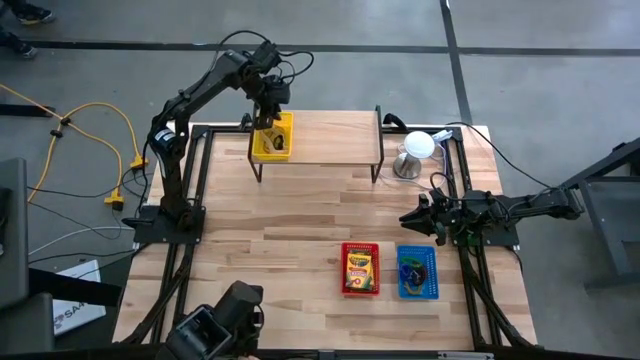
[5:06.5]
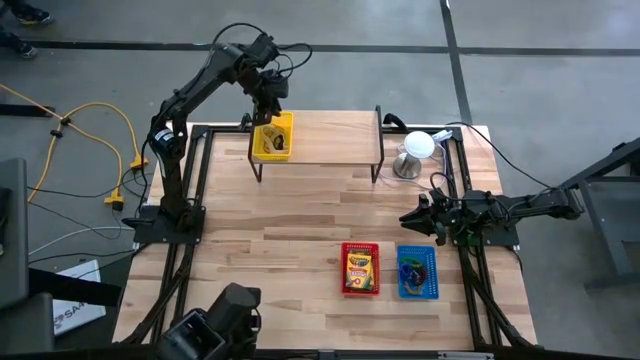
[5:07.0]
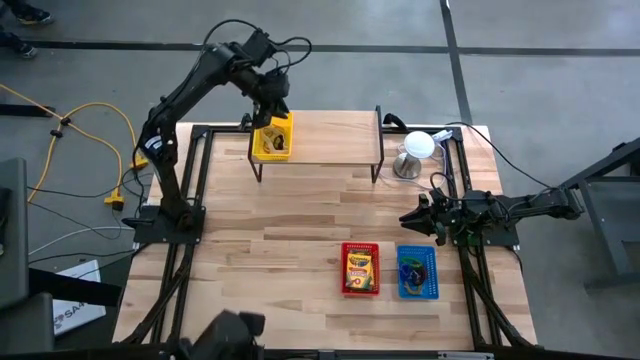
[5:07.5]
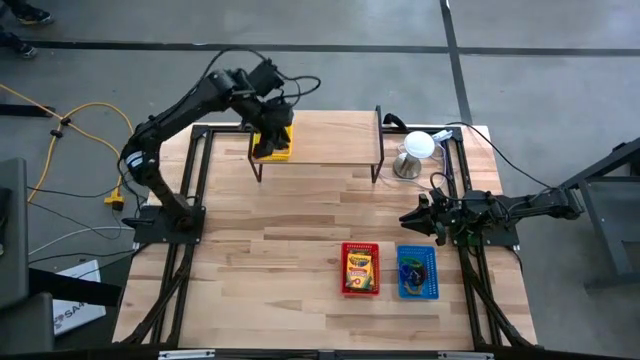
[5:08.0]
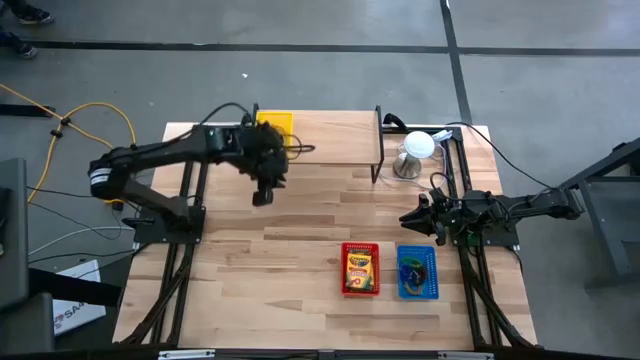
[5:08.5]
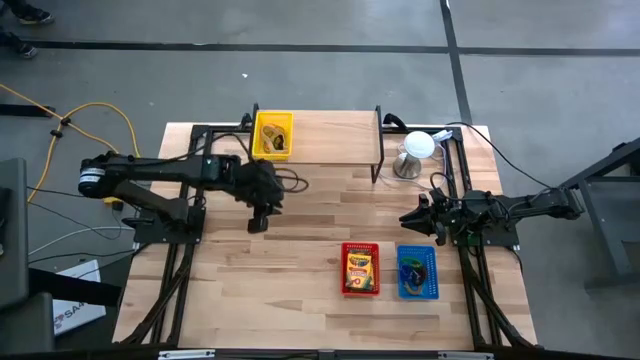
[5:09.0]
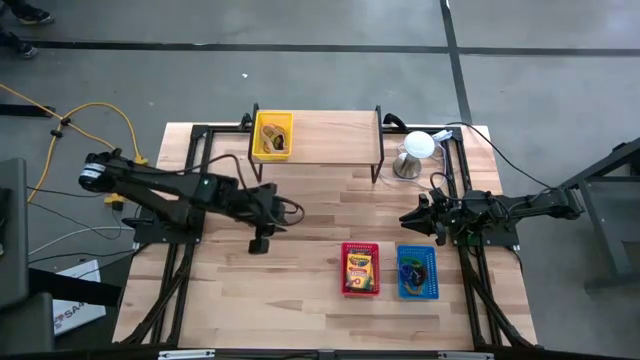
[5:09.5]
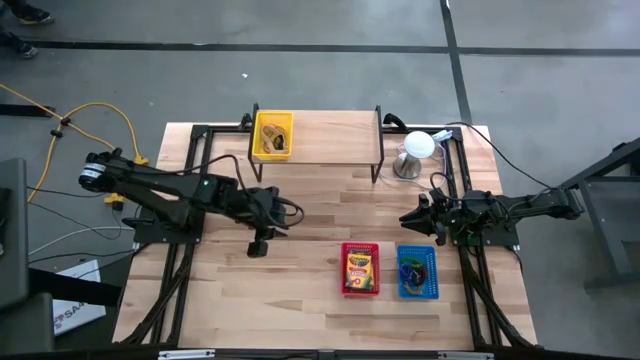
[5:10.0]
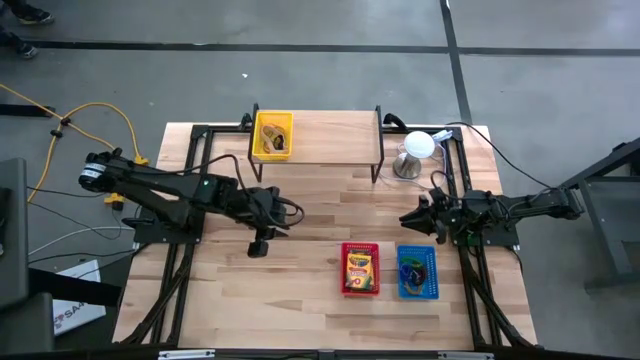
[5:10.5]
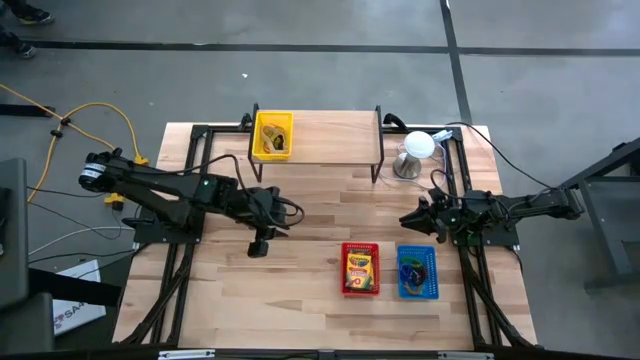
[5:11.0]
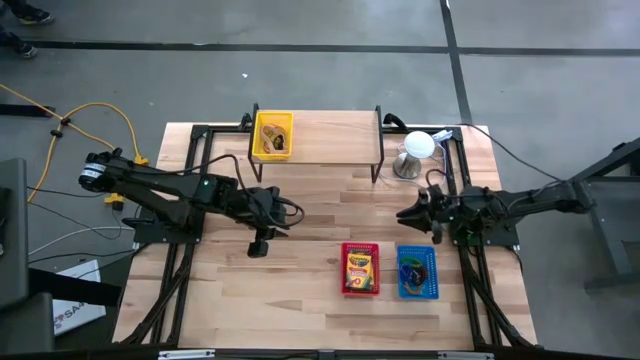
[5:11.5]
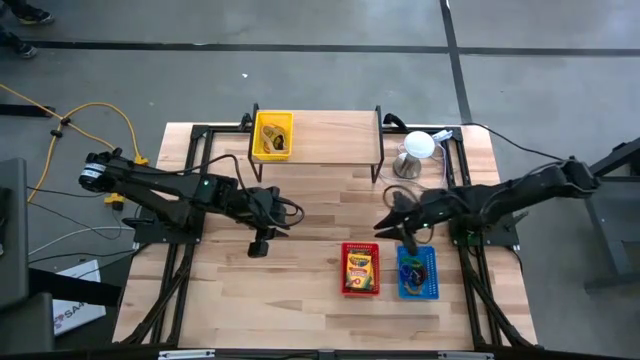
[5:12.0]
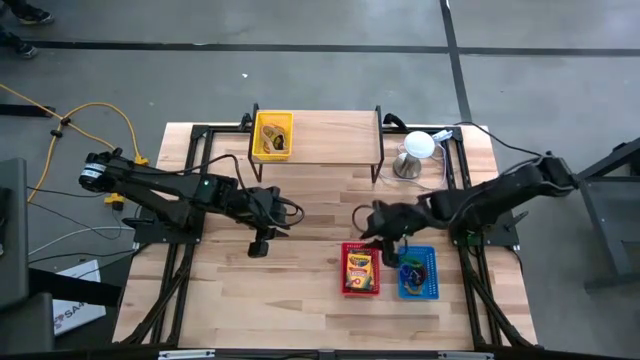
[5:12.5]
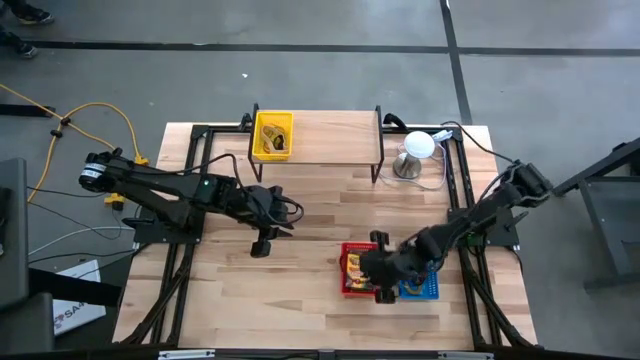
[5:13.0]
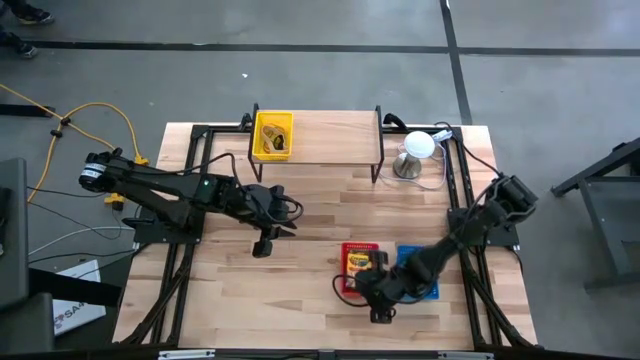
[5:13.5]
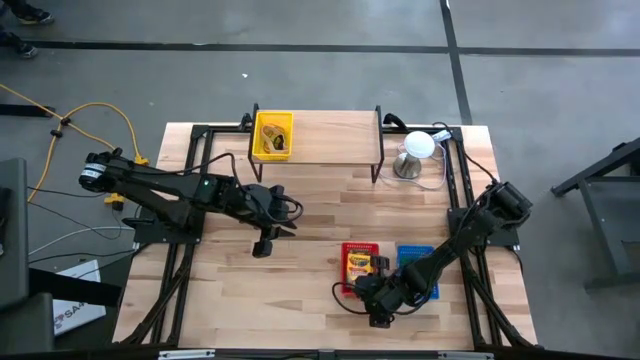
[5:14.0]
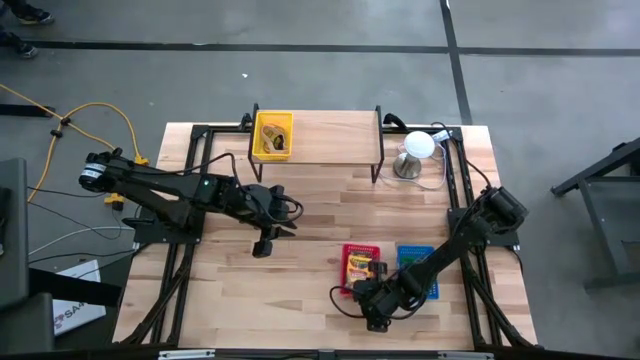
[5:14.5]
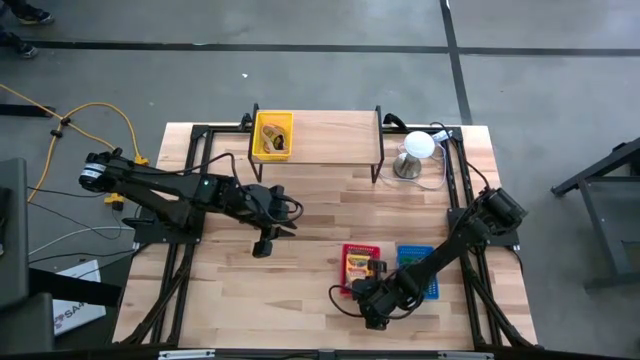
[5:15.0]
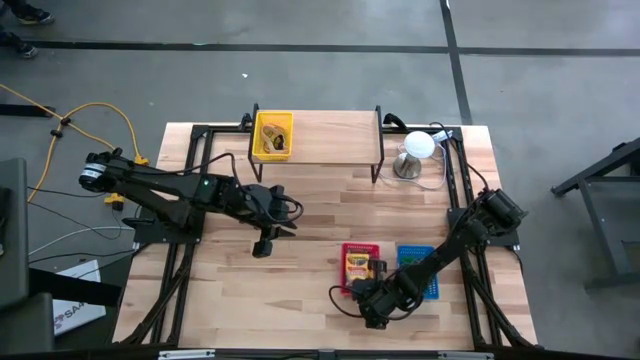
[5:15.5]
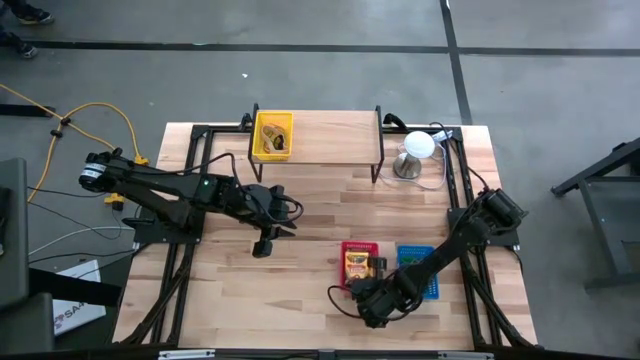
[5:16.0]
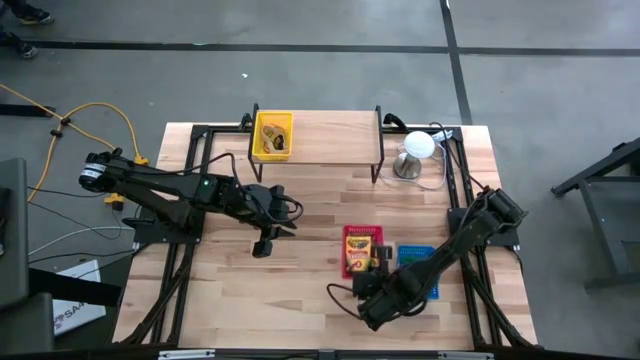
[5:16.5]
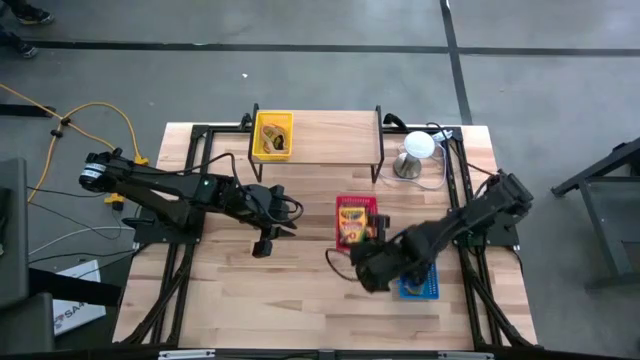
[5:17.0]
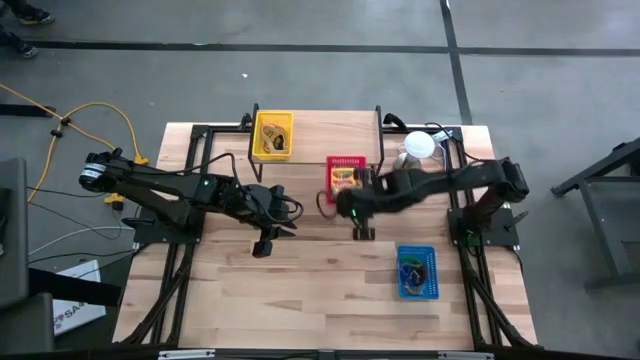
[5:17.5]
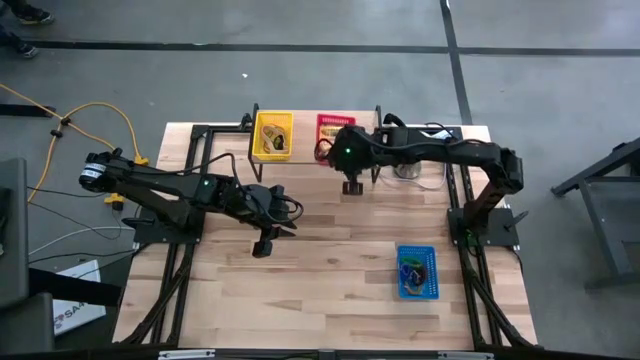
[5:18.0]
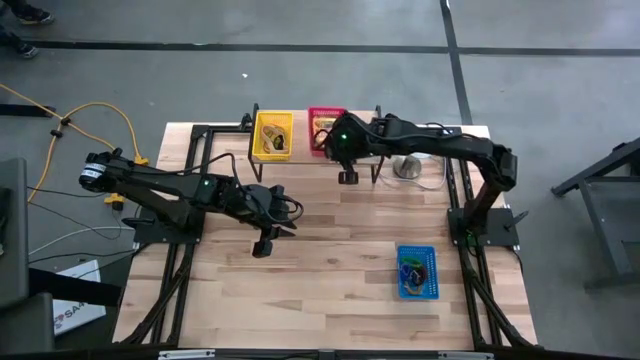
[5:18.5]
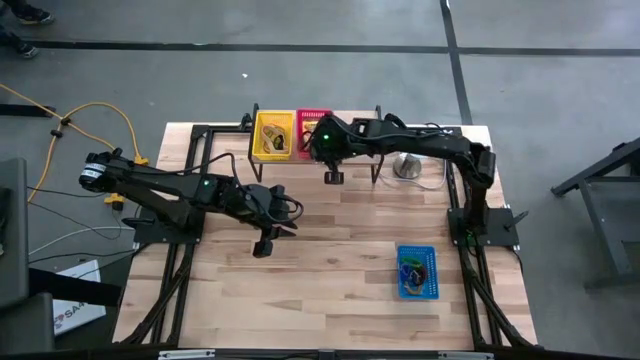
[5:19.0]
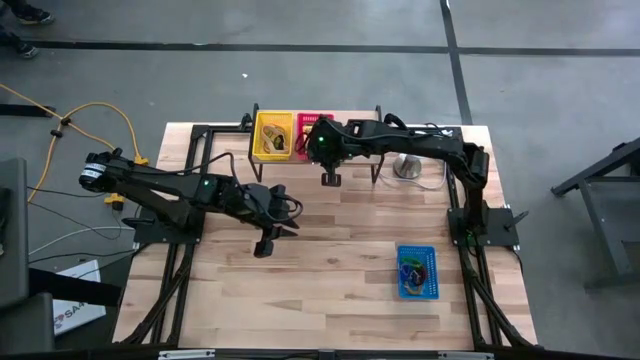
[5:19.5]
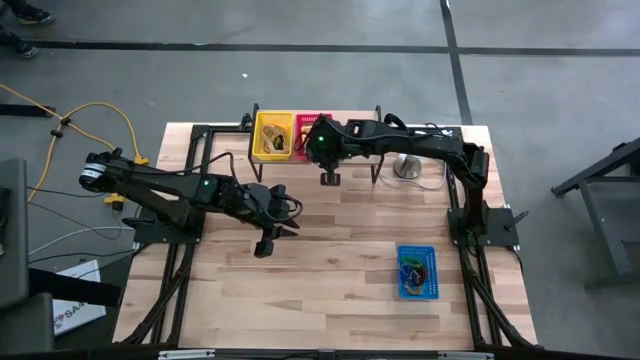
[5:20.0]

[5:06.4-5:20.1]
Task: Pick & Place Office Desk Supplies
Put the red bin with the crayon boxes on the shelf

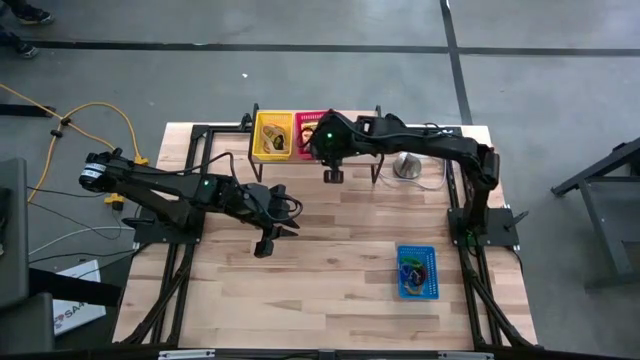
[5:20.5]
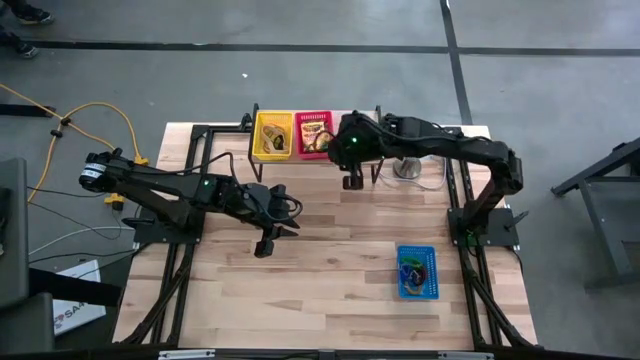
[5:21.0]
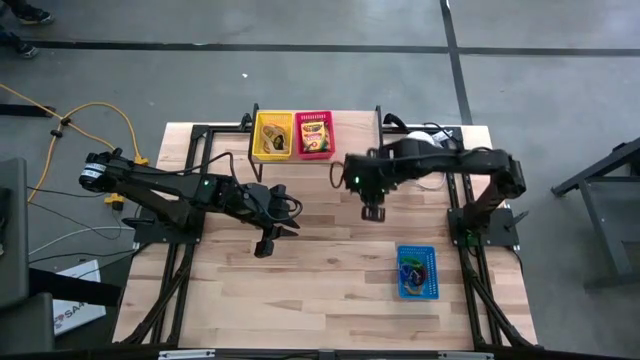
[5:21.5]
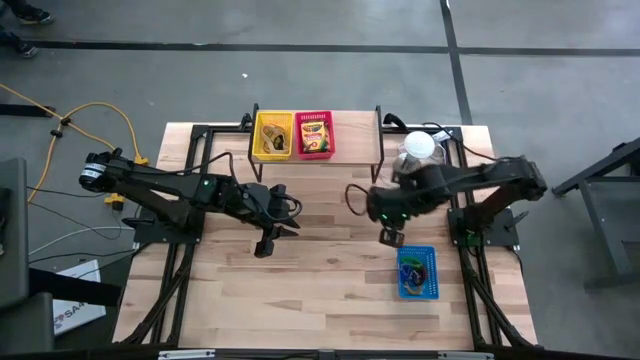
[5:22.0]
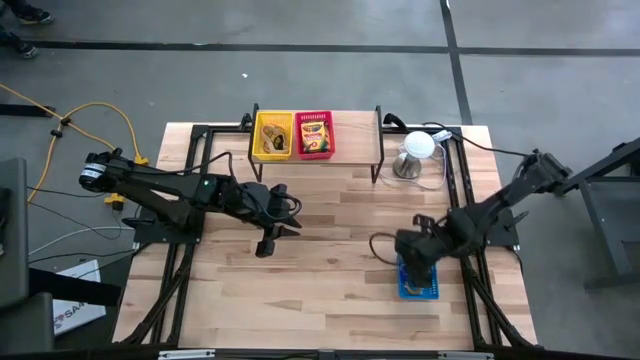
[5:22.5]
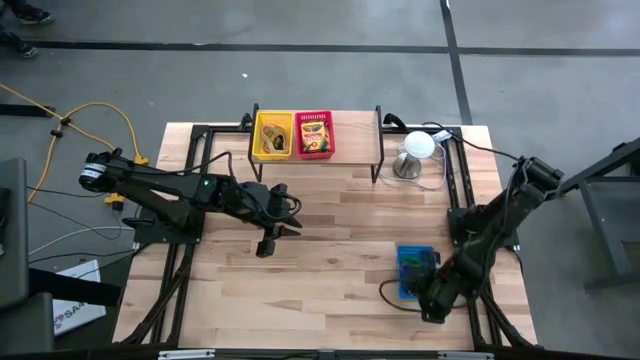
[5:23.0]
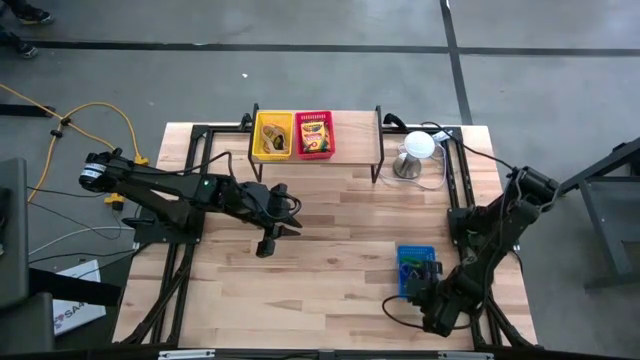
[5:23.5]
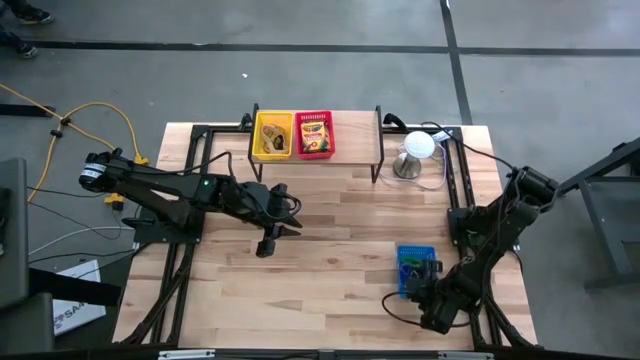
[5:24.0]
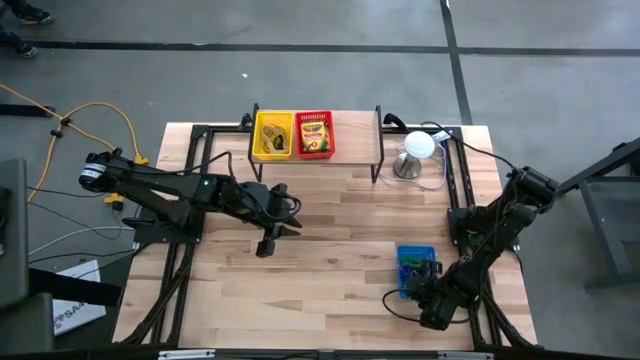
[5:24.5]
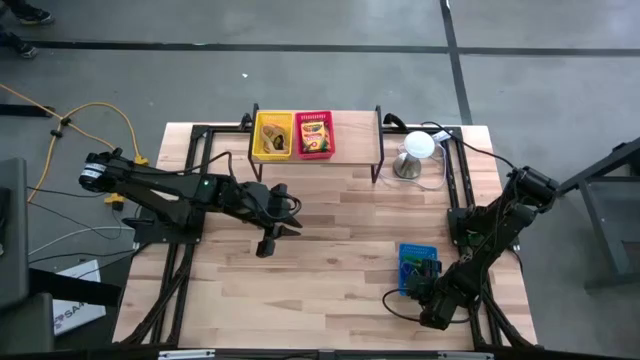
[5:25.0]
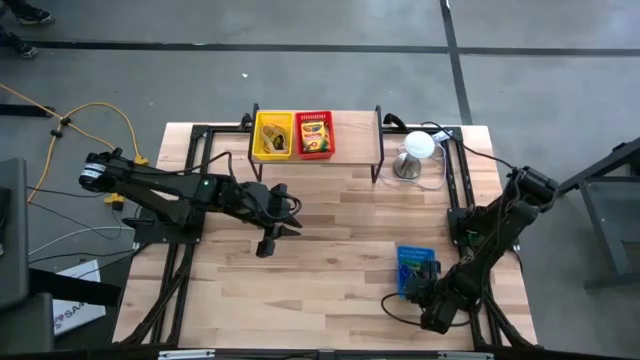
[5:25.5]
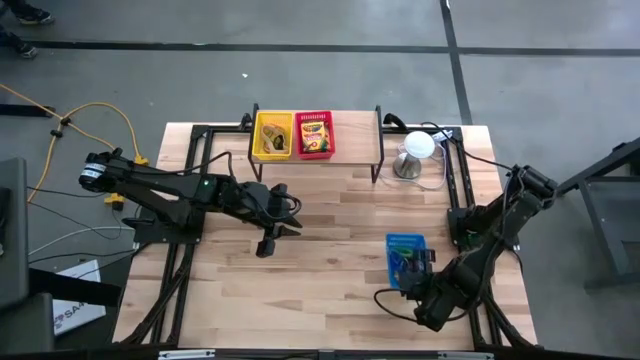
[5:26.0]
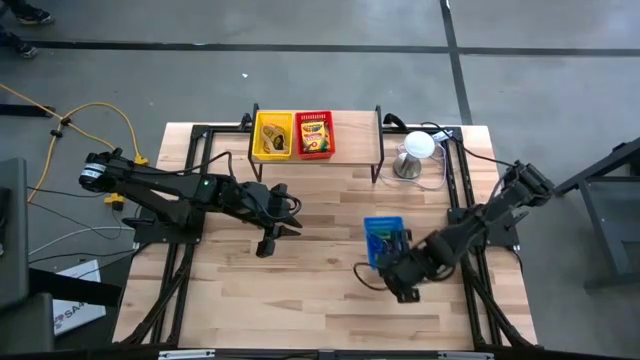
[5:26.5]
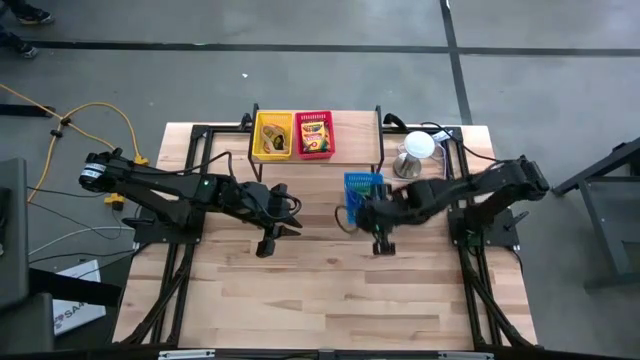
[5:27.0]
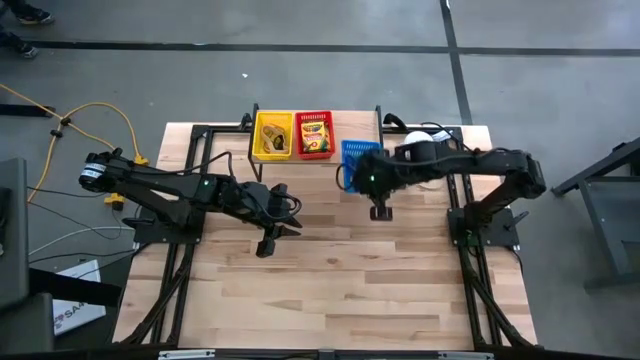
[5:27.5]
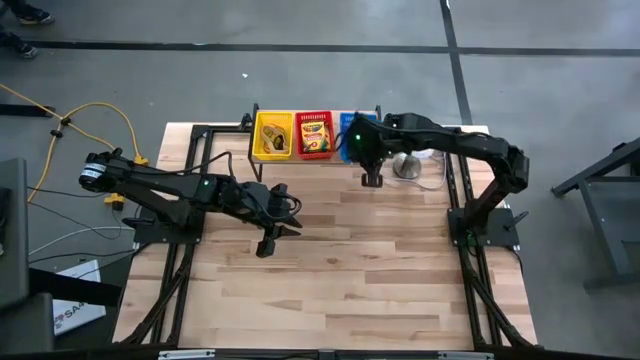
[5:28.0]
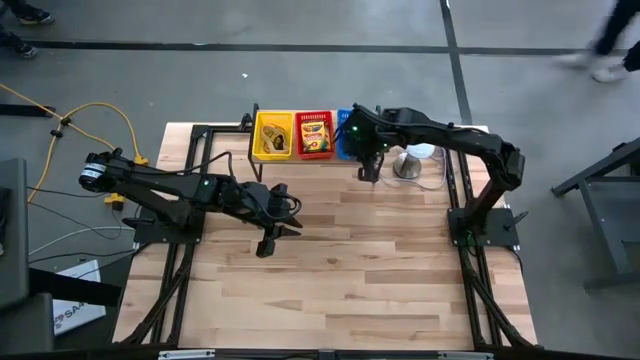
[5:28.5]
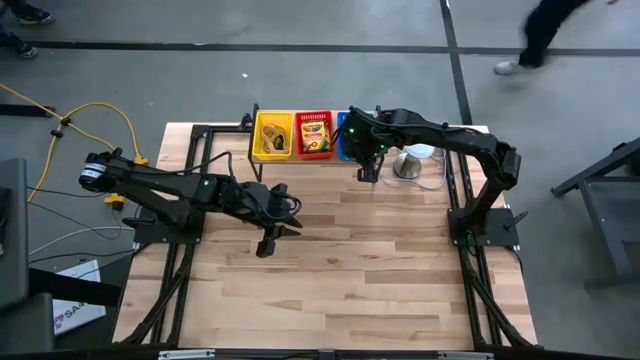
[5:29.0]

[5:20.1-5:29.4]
Put the blue bin with the spring keychains on the shelf
